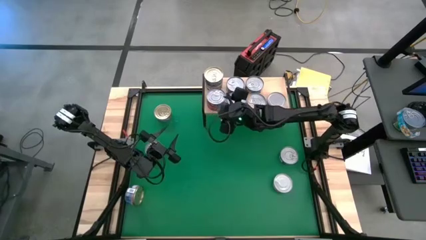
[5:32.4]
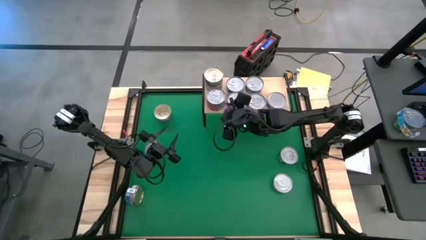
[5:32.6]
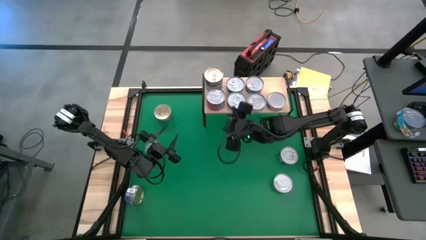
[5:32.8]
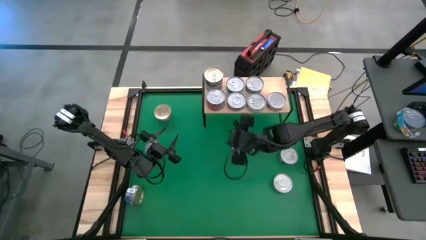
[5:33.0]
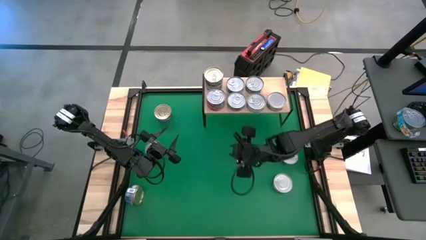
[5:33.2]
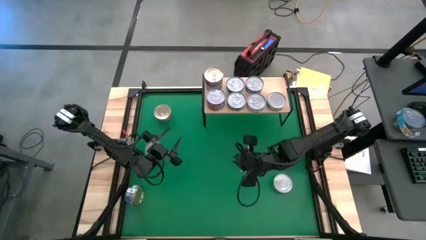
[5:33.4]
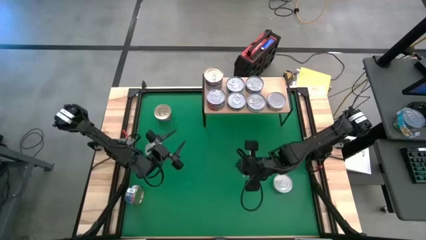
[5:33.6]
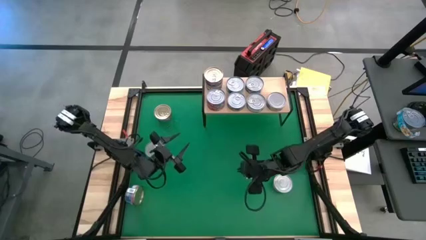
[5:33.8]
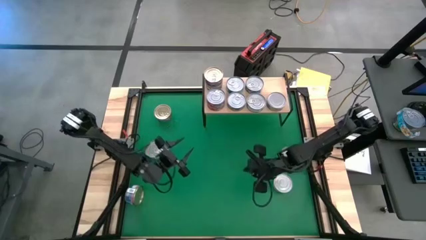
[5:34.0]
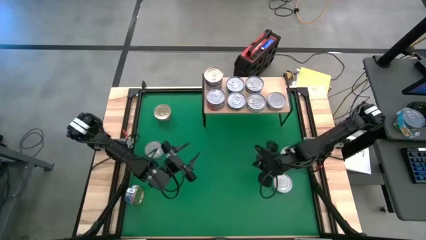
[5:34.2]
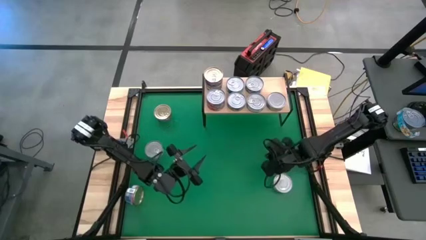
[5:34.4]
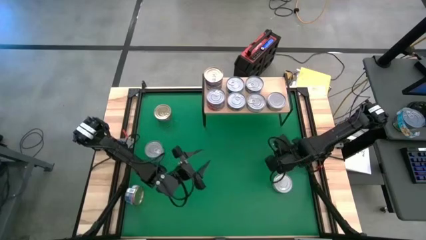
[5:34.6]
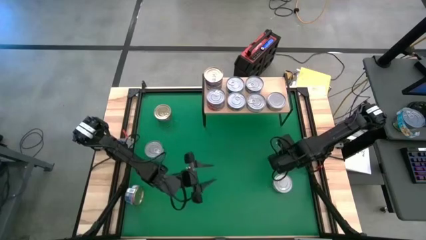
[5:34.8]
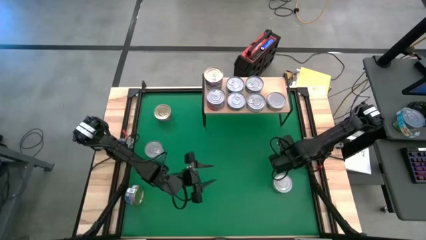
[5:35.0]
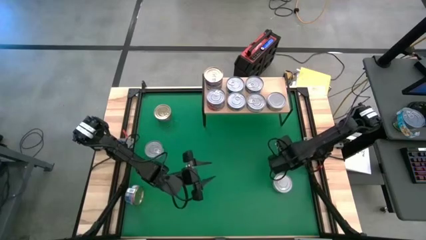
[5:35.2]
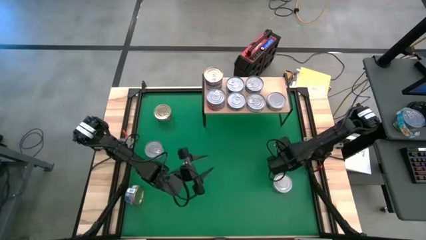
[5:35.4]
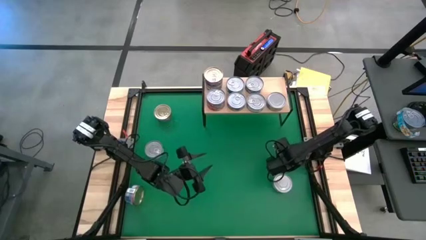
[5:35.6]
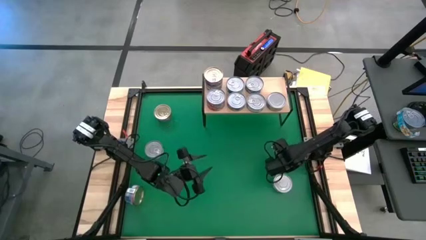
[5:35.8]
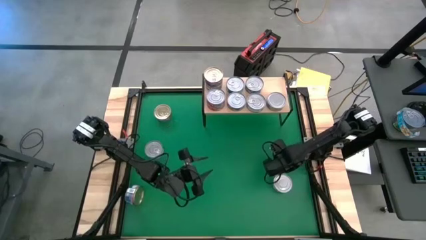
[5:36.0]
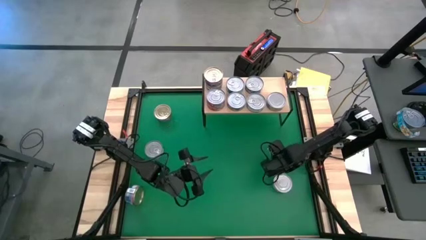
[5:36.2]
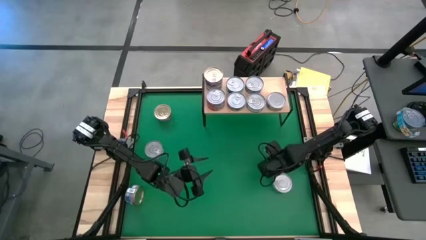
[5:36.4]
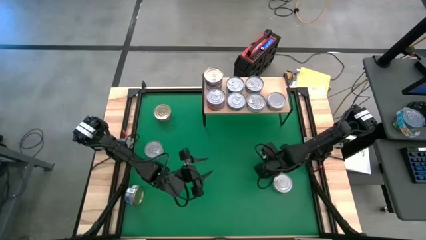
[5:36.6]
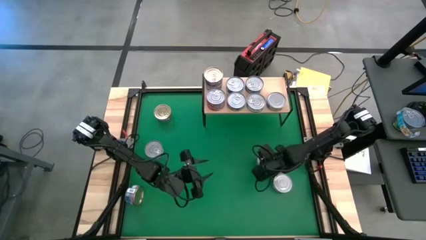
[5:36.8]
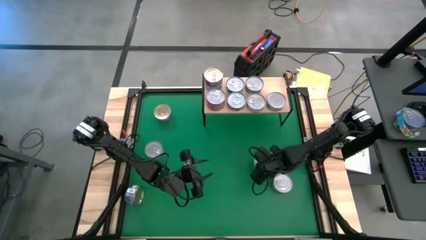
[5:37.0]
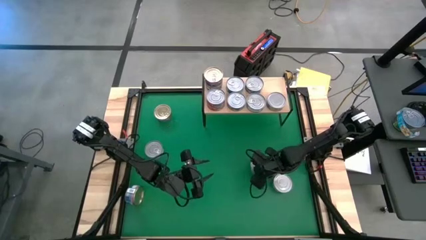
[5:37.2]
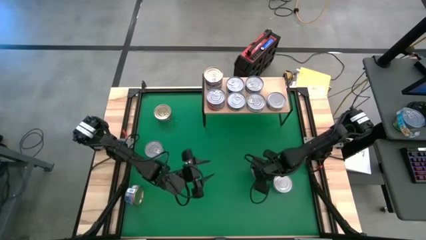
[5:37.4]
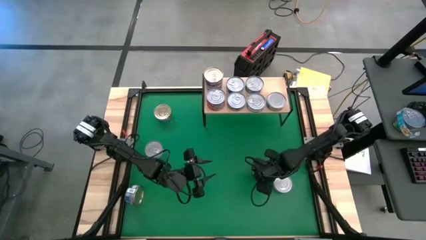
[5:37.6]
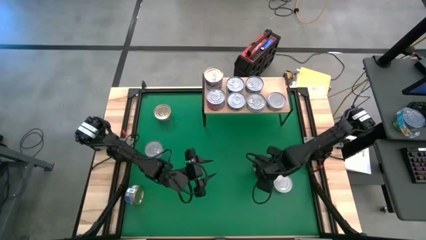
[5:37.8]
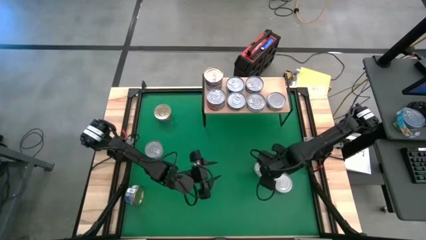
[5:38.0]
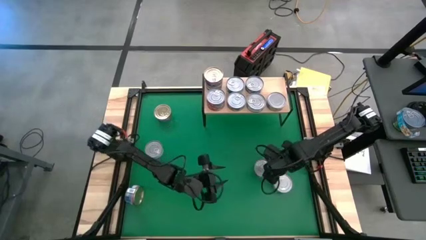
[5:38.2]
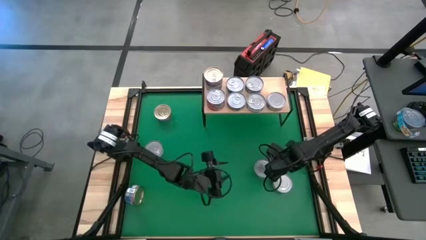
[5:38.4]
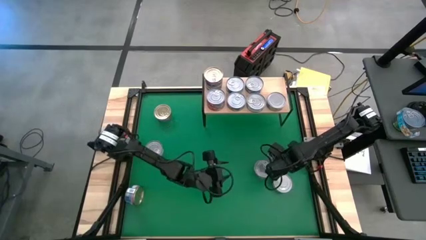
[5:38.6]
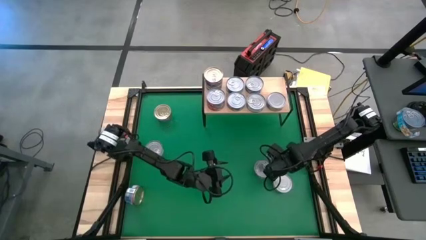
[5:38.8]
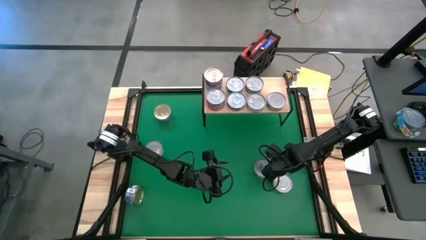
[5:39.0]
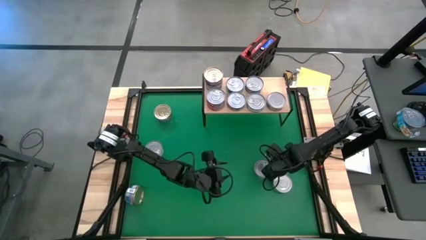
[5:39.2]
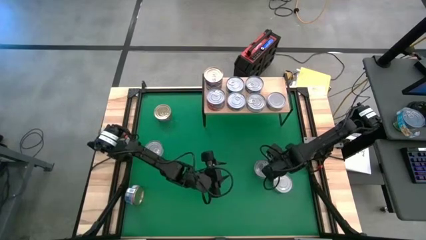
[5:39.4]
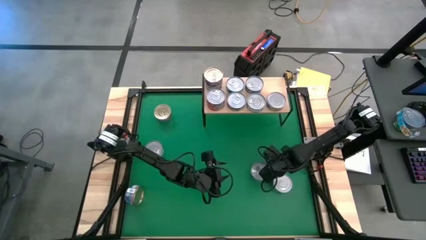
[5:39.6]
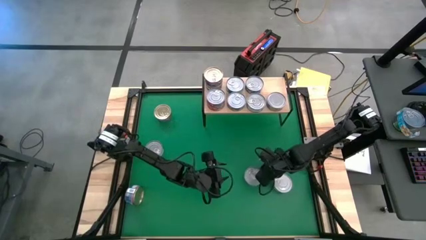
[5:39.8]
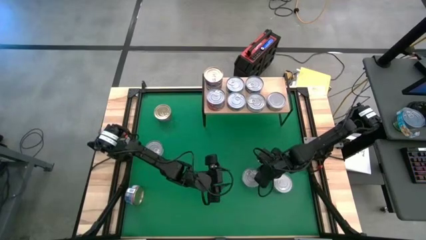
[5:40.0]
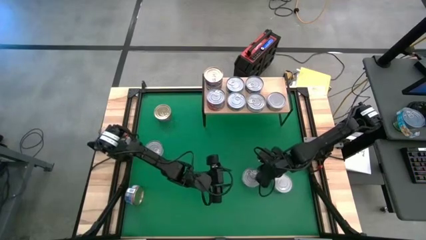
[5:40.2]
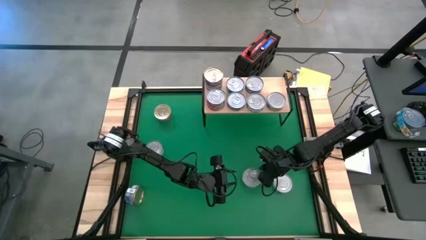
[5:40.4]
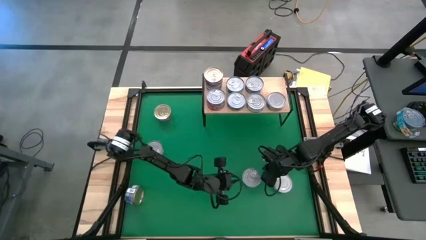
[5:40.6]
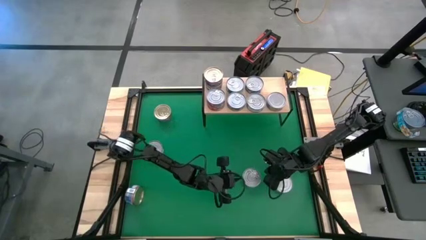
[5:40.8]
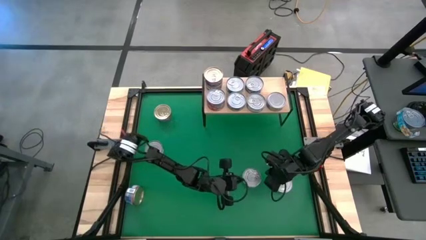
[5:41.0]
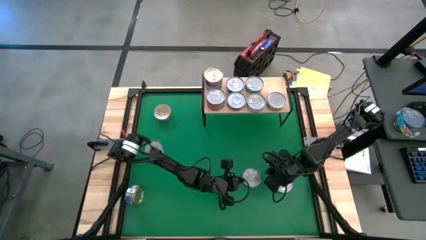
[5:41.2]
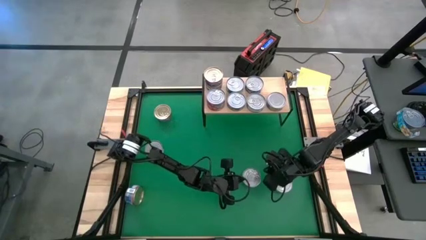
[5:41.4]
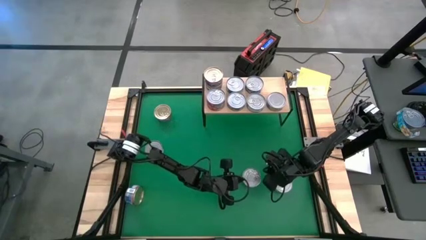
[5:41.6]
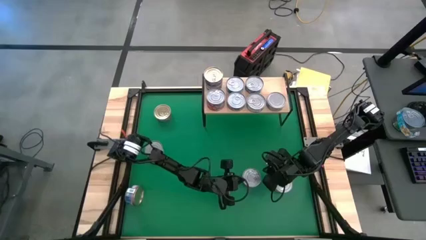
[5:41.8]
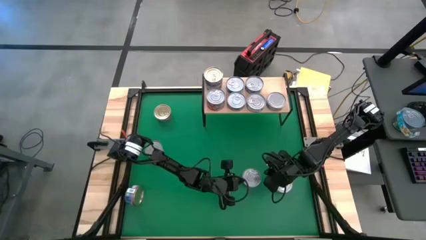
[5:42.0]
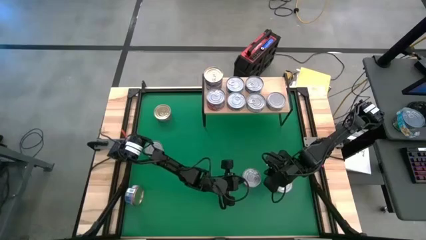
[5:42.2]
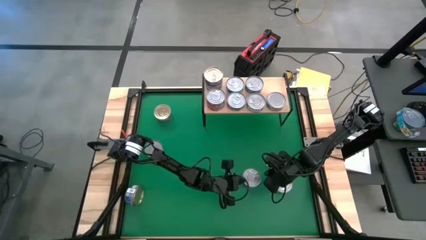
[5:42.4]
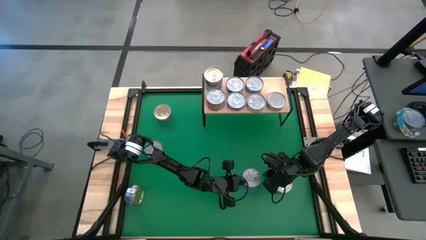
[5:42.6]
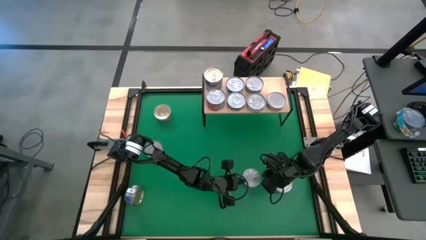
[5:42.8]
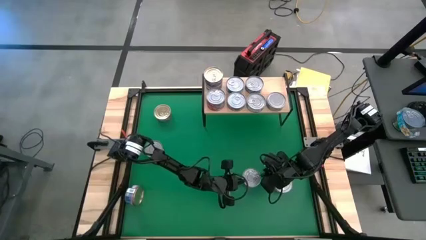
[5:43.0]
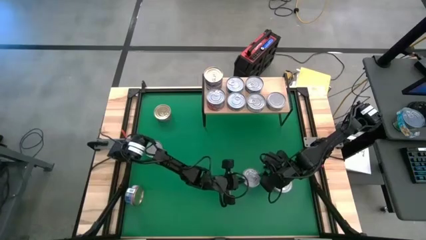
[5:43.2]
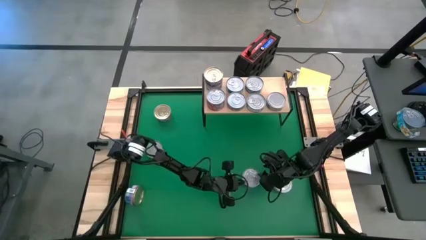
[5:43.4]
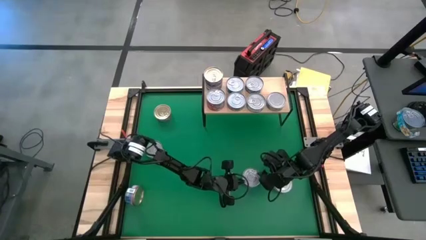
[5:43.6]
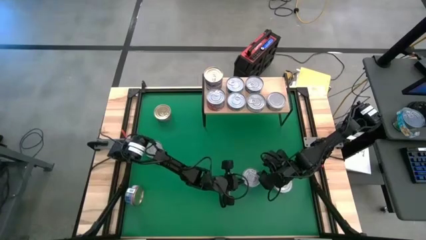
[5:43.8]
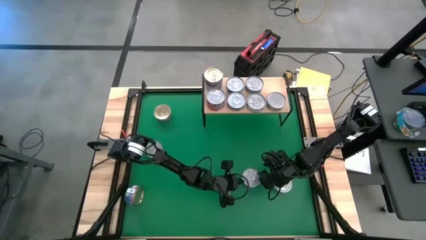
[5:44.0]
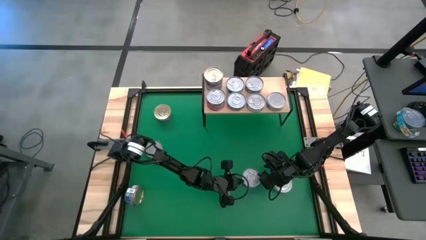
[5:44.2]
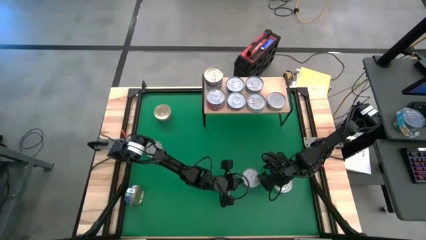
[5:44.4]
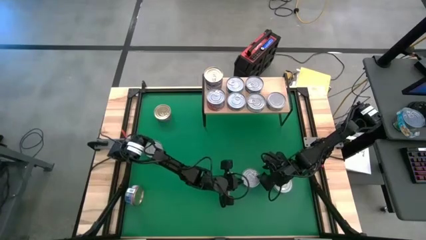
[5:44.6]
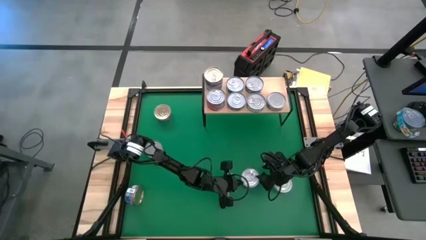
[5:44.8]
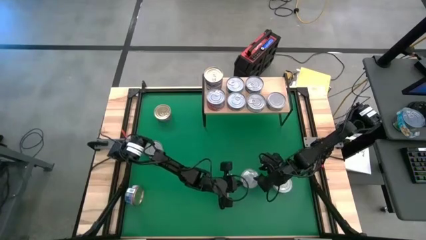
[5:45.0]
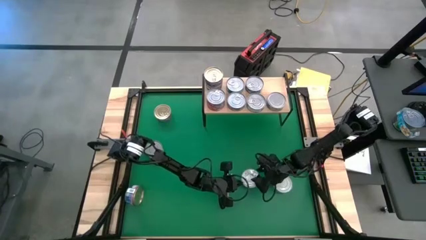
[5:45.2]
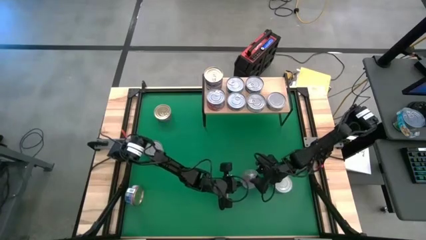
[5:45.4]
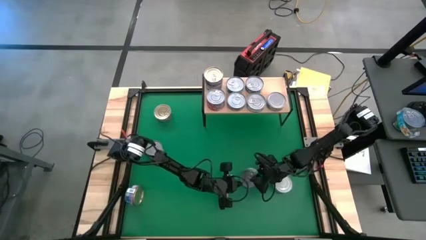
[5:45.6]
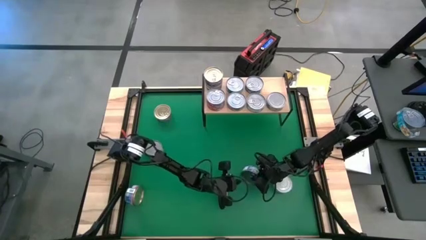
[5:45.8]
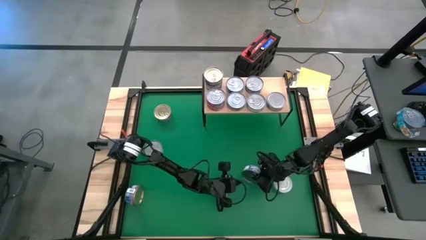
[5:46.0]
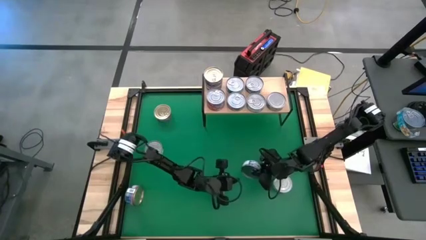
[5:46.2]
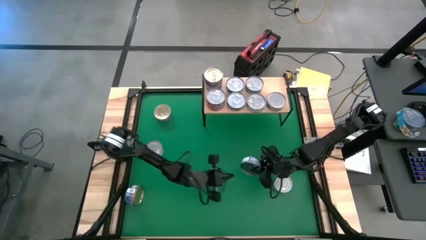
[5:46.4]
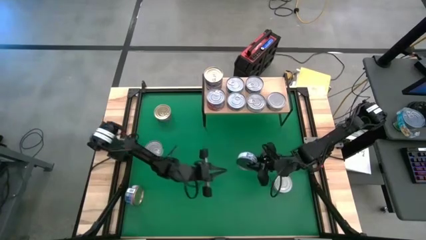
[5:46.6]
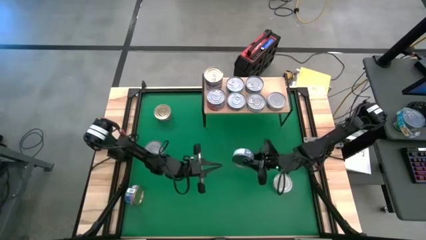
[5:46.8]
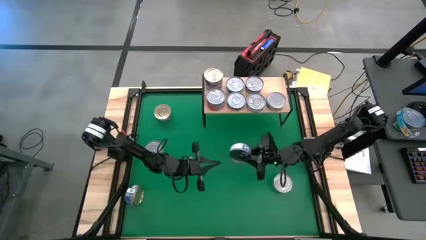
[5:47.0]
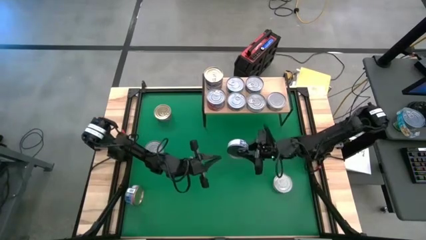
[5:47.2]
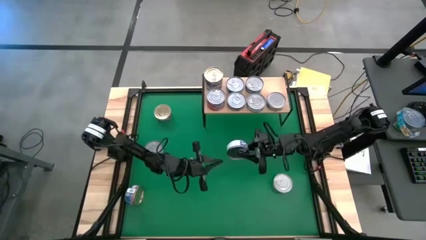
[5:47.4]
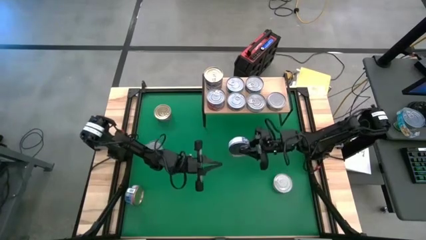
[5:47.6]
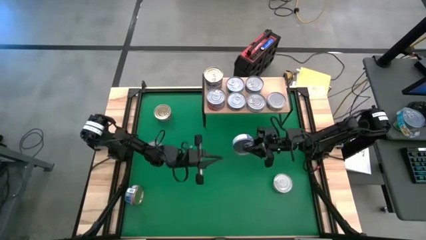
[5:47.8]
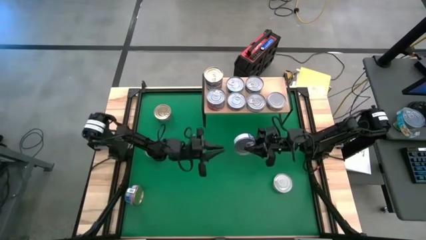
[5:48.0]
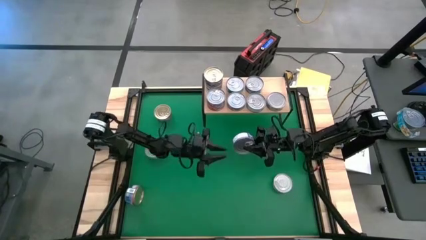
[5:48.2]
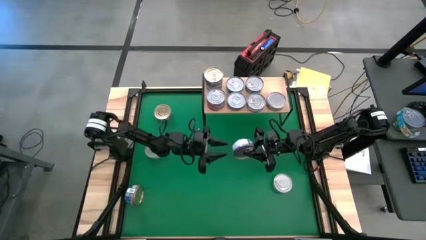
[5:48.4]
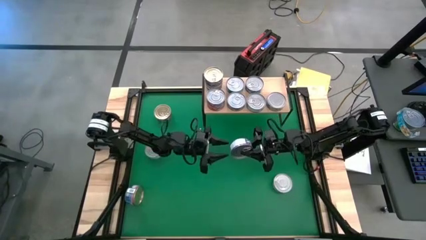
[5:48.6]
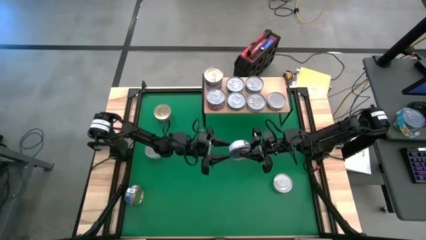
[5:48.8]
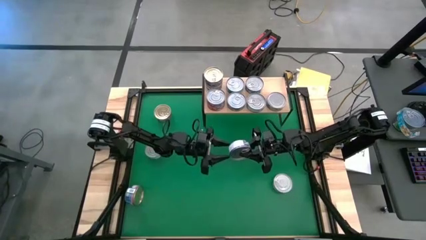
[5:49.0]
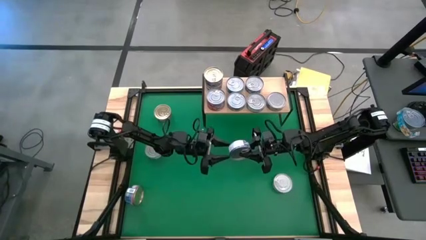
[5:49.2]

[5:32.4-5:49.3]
Task: Stack canned seafood by type on shelf
Stack the blue tuna can on top of the other blue tuna can on the shelf
